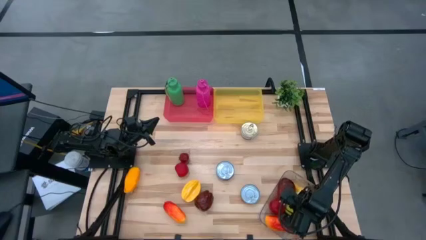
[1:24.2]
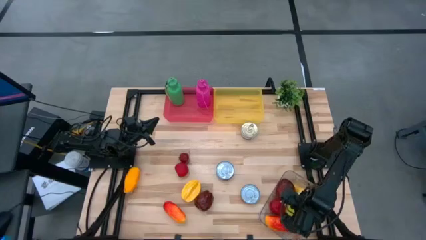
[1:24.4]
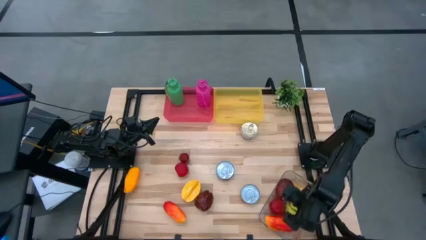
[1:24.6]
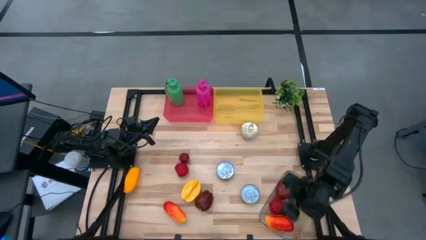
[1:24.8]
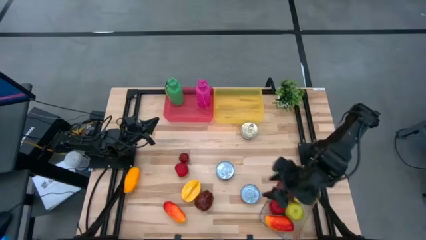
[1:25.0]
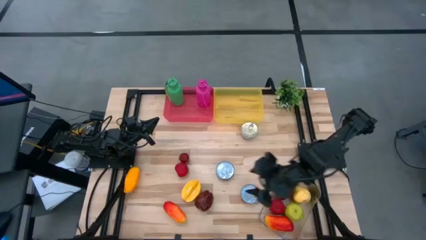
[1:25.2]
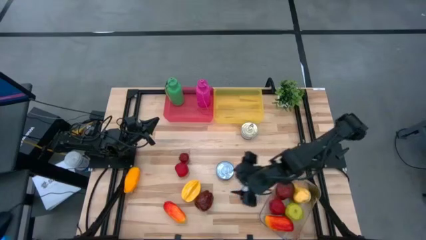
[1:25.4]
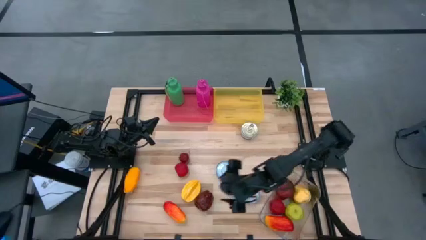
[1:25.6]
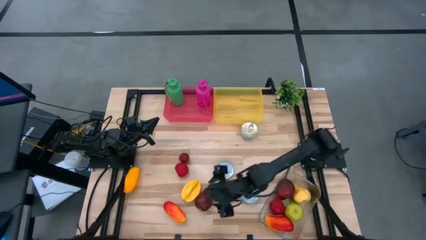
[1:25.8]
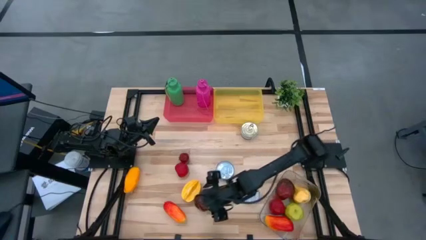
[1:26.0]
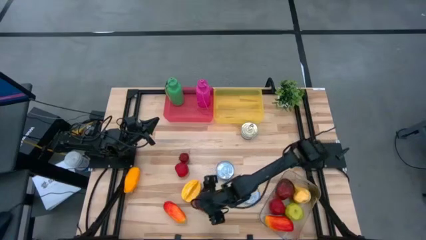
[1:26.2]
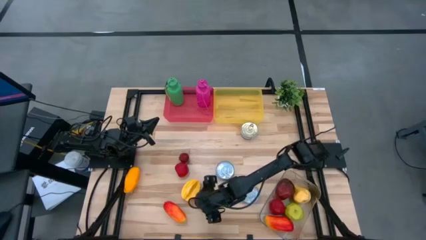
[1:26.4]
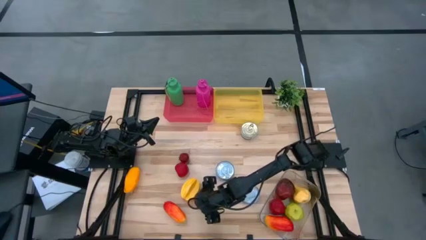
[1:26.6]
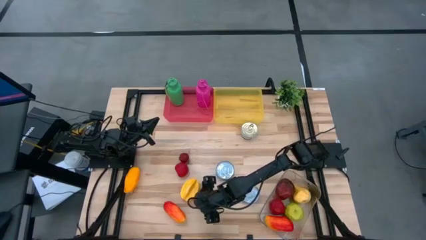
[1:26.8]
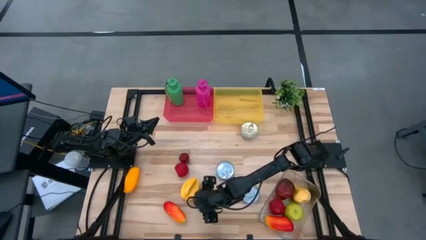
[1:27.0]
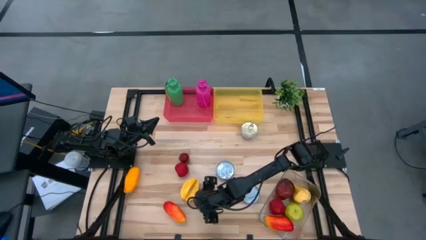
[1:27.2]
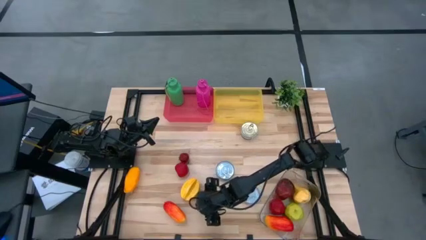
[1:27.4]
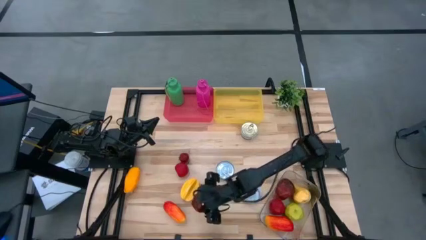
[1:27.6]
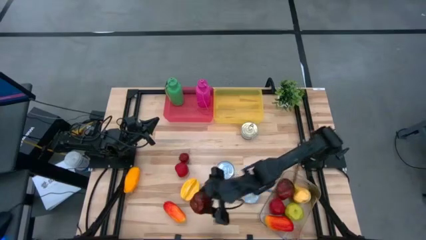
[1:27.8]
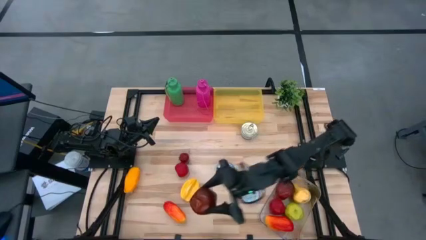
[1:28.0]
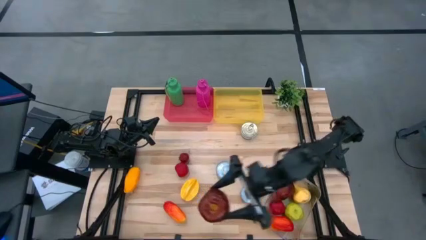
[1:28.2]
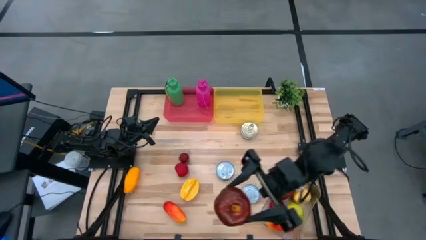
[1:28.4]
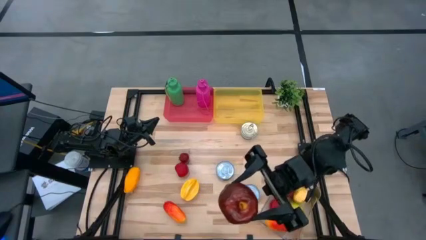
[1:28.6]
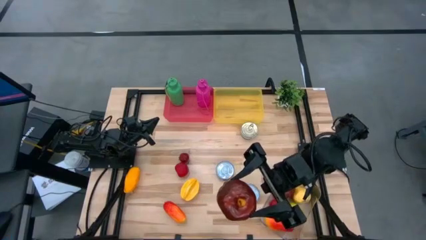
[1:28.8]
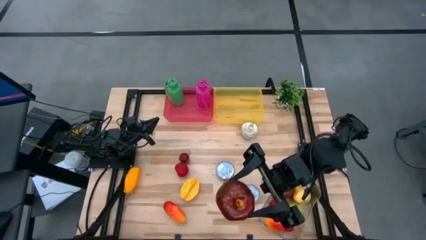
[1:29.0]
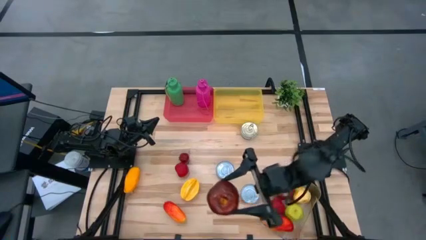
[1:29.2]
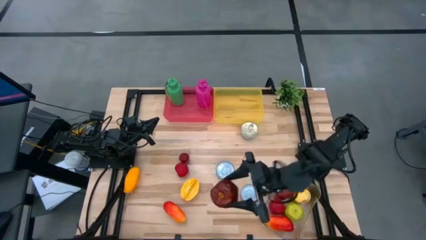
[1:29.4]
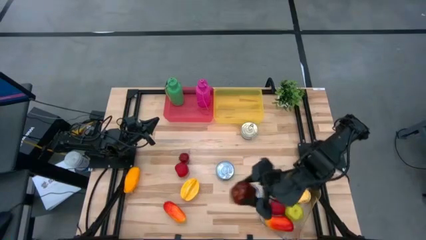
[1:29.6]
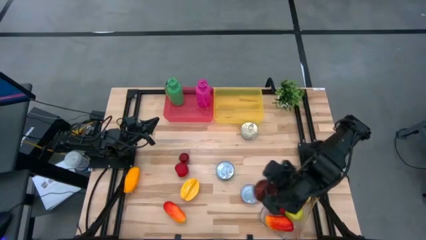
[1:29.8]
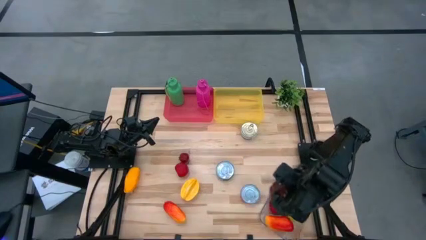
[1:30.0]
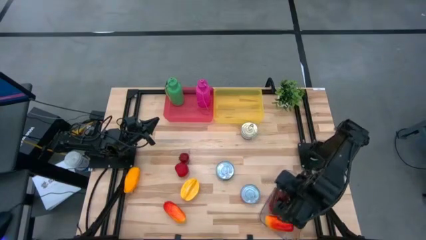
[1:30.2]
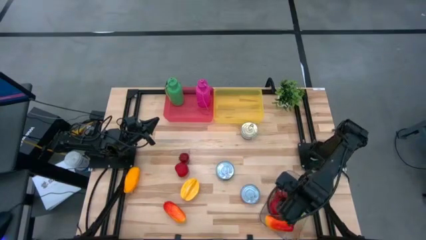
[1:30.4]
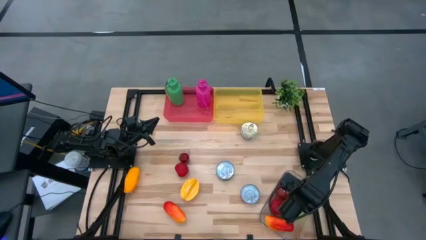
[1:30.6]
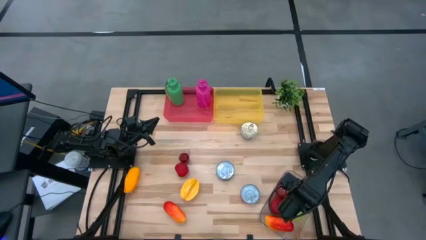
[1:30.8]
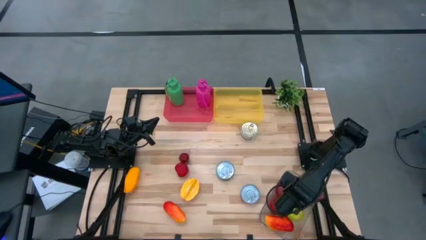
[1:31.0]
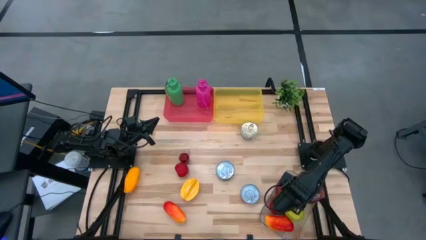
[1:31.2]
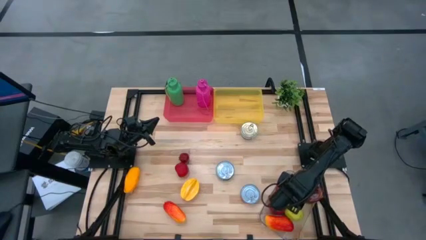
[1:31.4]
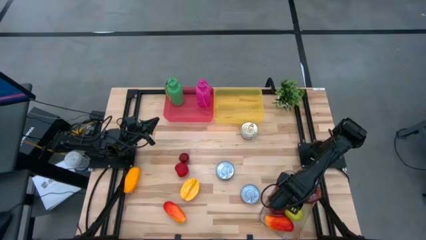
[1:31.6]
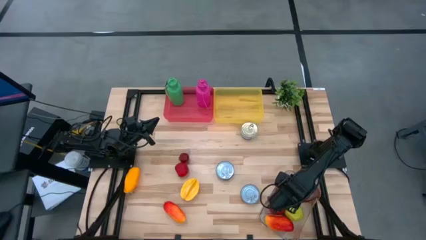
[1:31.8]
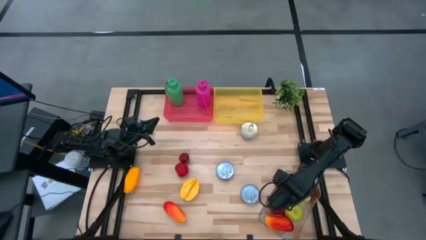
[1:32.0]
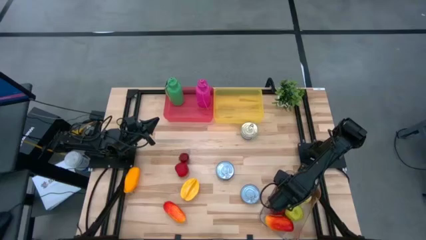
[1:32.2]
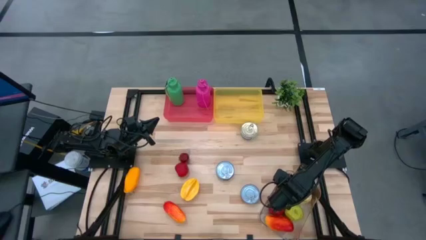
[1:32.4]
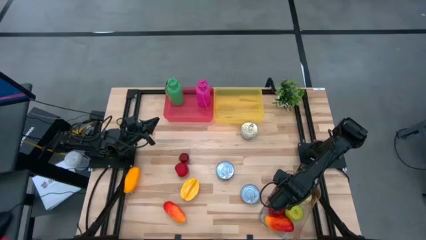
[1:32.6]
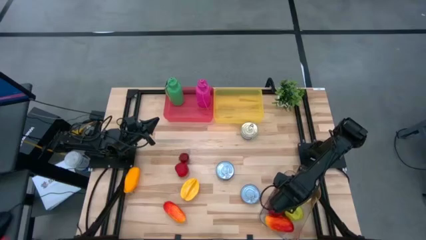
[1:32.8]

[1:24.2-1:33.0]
Task: Pick & Place Food Item
Put the bottom apple into the transparent bin

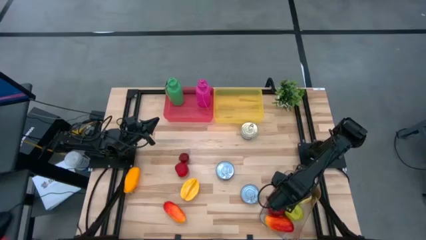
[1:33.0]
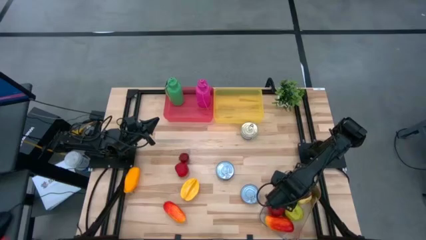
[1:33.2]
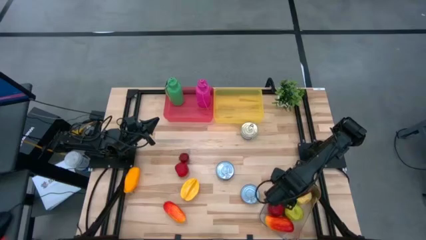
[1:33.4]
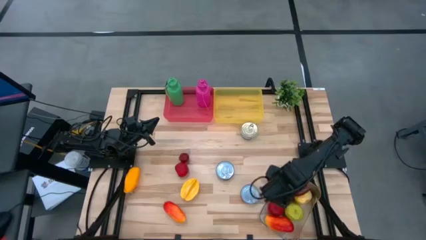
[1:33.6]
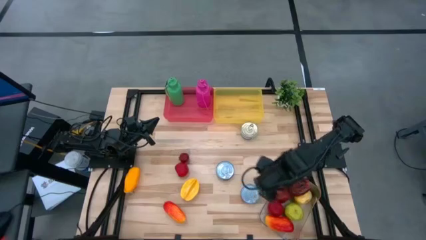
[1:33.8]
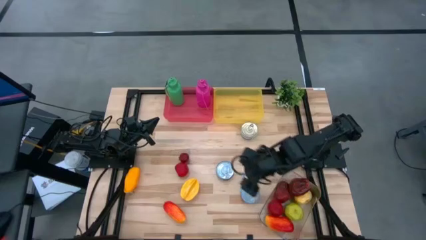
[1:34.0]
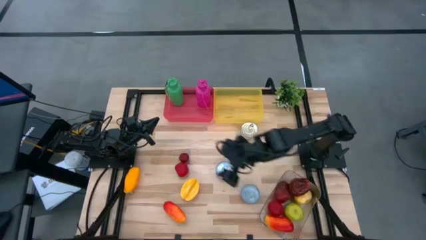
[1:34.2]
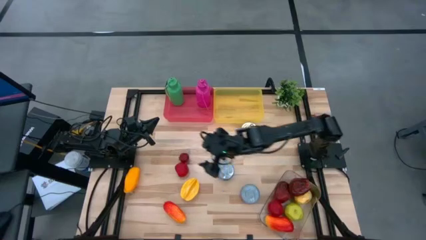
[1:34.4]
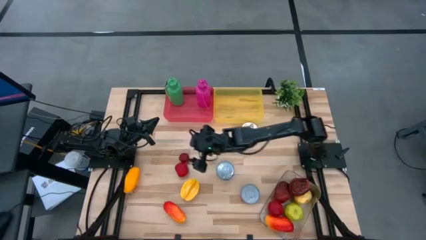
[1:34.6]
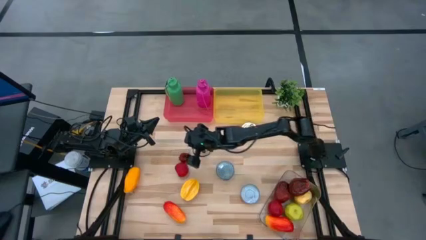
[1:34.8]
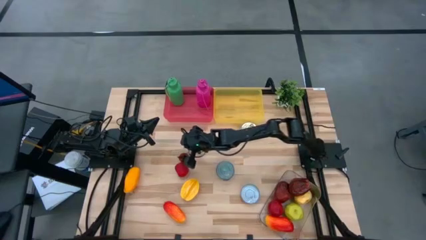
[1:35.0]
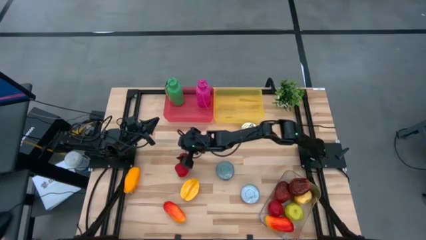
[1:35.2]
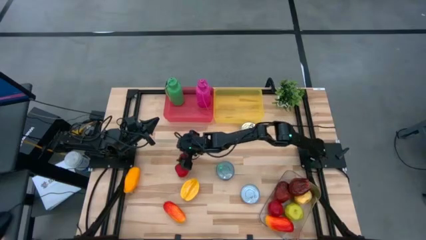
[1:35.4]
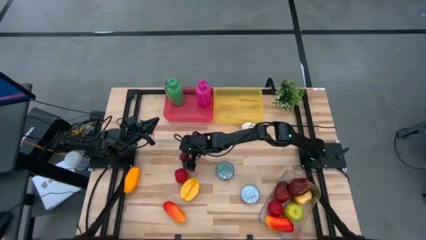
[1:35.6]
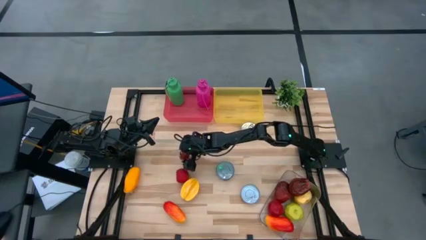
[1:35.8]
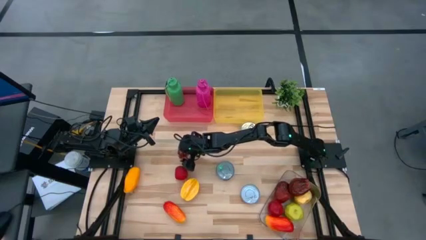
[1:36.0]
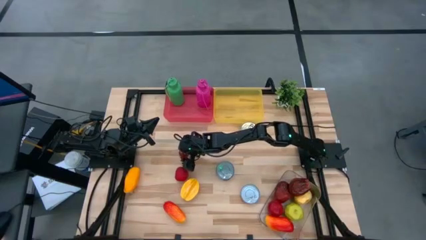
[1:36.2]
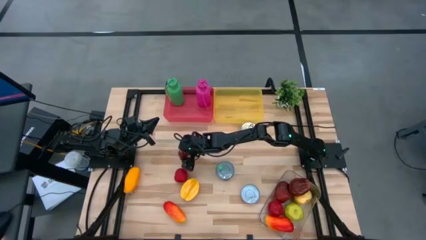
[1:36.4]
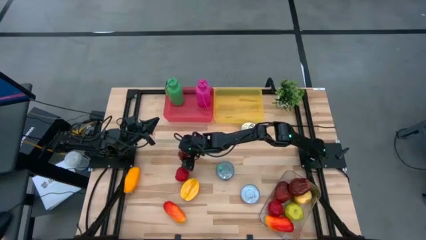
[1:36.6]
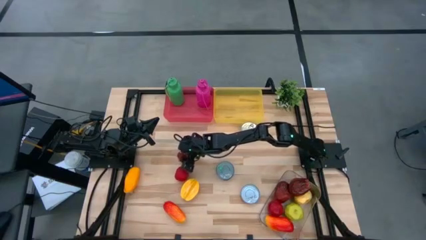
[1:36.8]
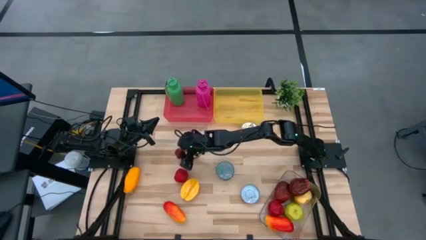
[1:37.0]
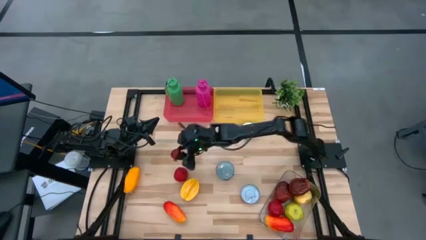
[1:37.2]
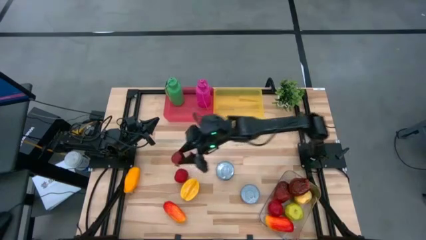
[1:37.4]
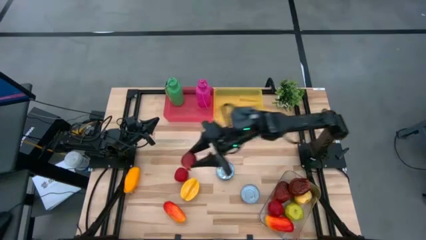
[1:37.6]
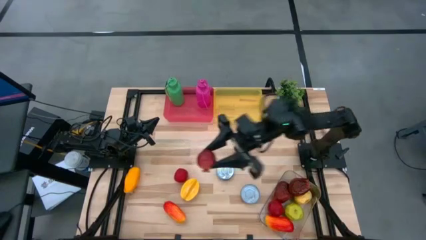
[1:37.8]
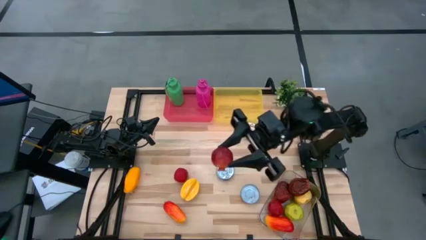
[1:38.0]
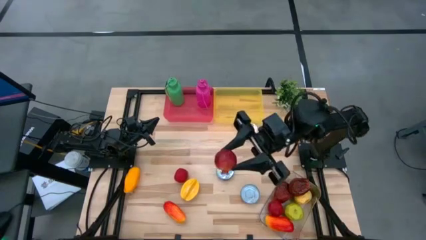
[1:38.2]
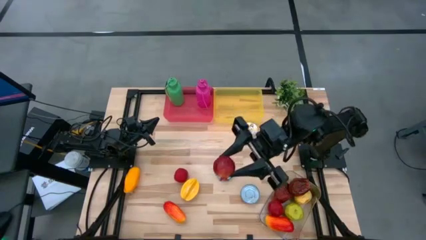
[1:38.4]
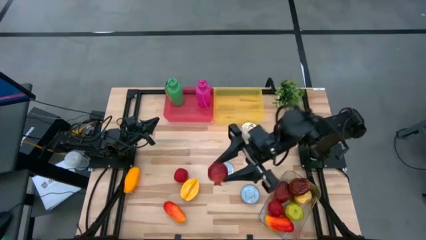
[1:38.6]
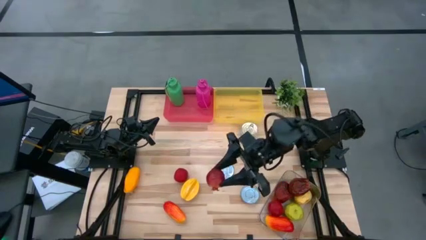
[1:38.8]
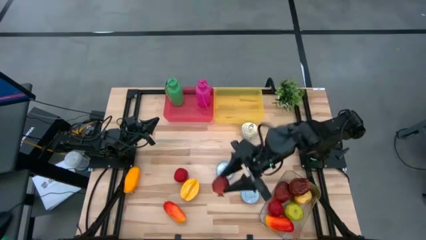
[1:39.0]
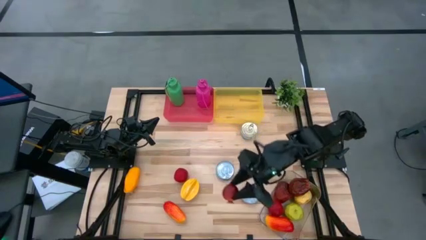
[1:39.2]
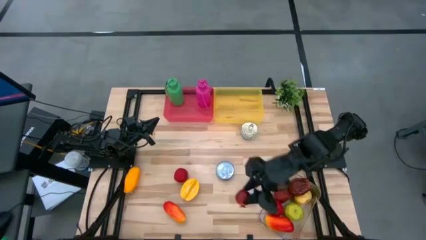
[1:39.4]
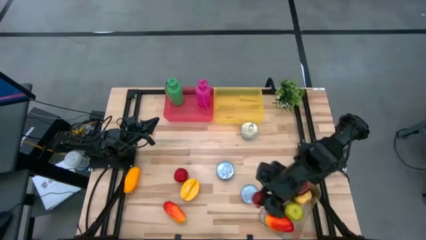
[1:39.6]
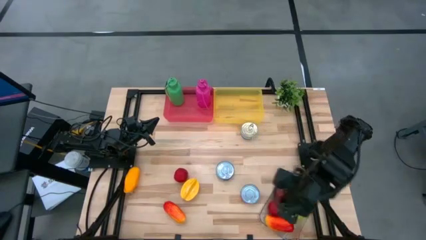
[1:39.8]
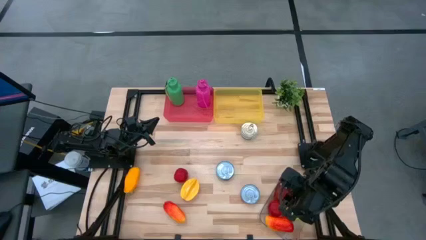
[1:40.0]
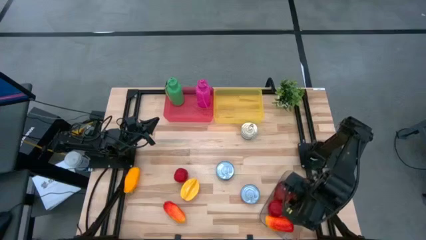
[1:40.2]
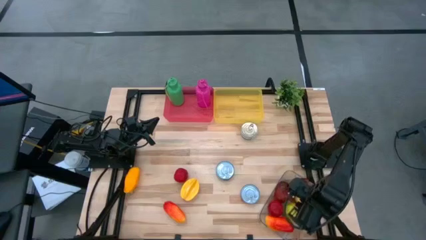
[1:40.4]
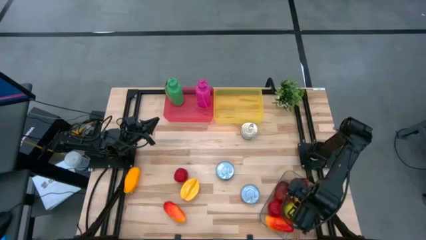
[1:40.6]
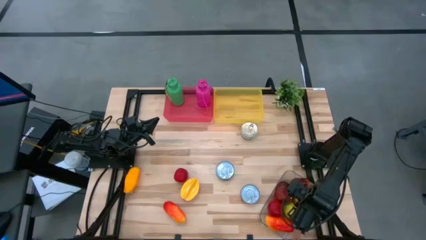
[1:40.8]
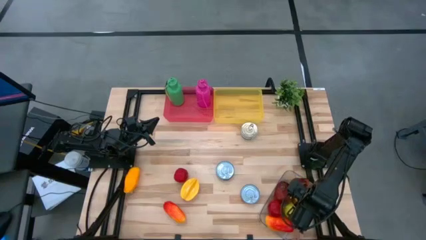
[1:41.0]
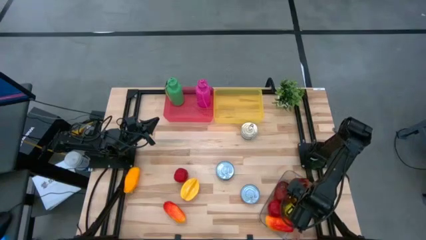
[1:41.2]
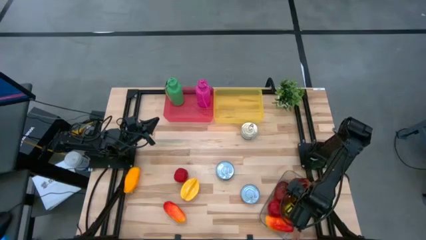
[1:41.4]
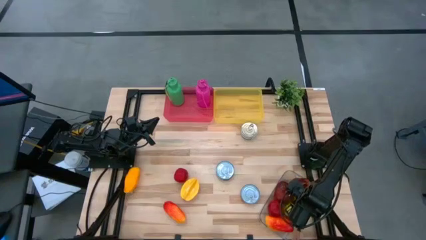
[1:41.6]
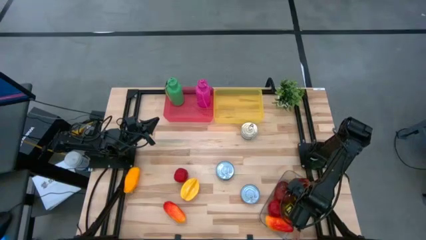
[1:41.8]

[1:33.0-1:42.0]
Put the pomegranate into the transparent bin
